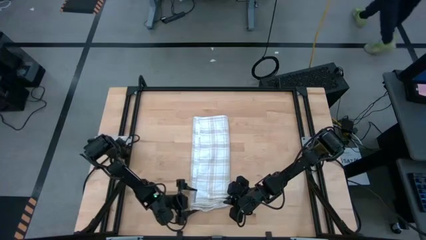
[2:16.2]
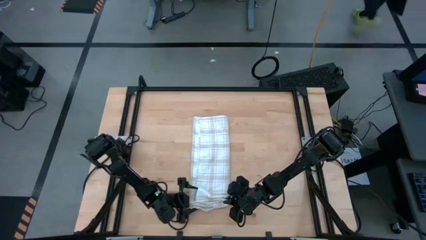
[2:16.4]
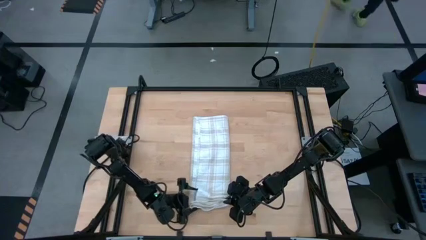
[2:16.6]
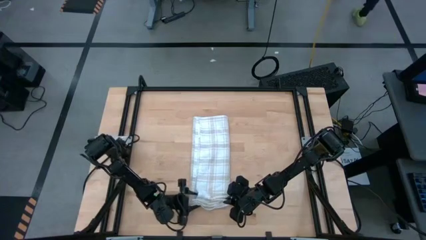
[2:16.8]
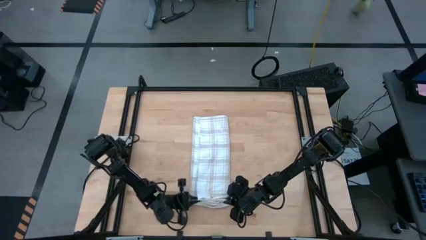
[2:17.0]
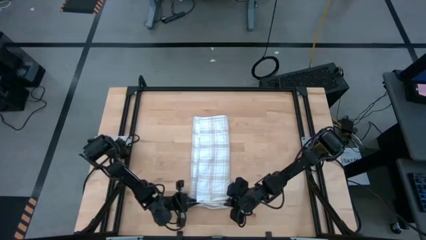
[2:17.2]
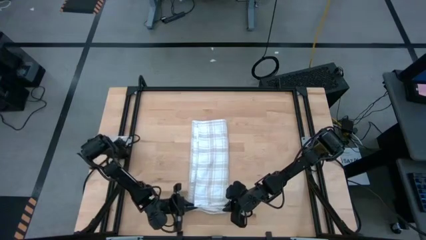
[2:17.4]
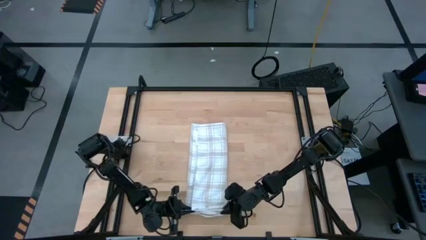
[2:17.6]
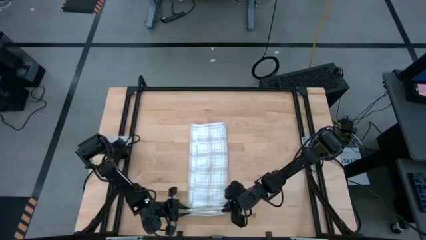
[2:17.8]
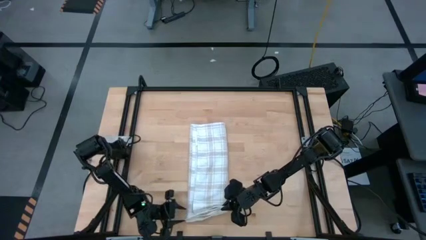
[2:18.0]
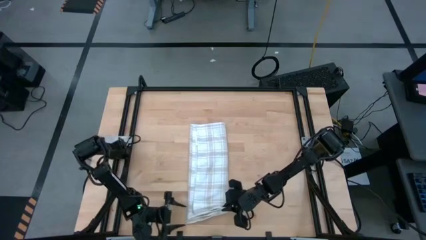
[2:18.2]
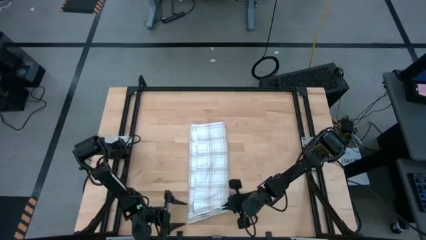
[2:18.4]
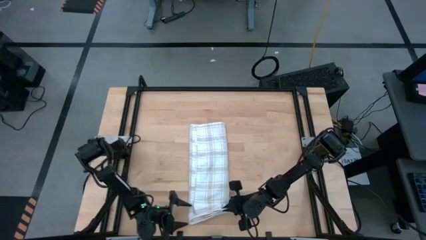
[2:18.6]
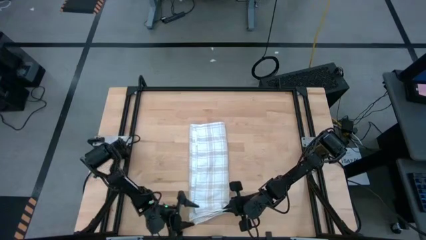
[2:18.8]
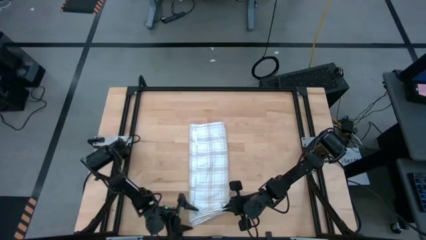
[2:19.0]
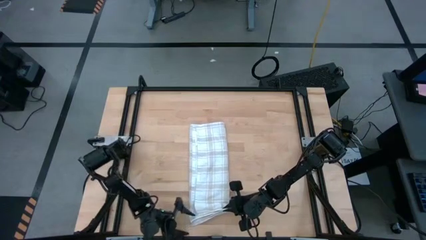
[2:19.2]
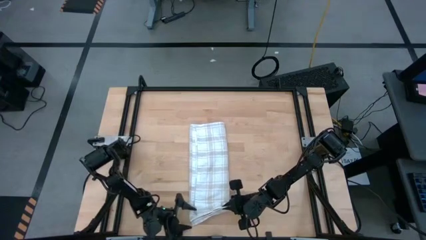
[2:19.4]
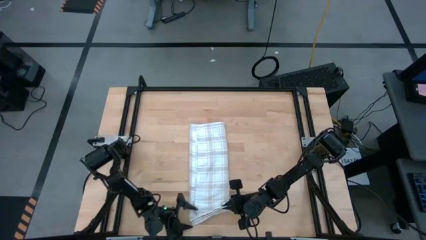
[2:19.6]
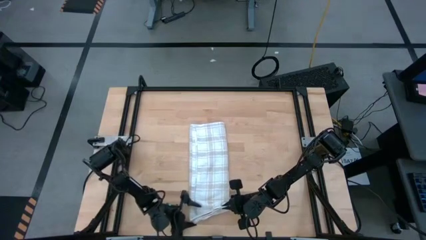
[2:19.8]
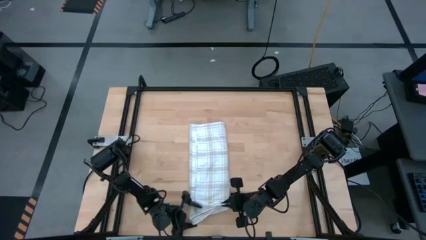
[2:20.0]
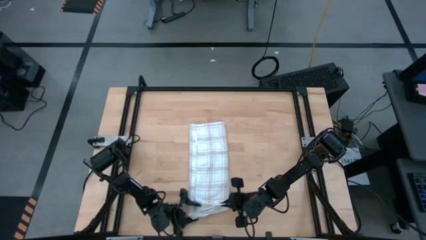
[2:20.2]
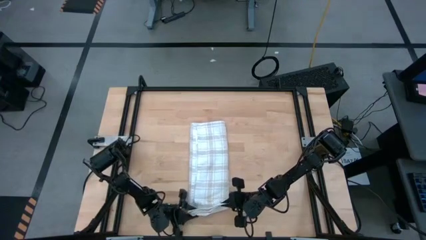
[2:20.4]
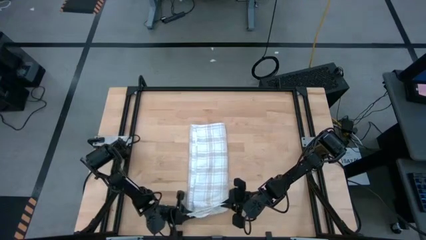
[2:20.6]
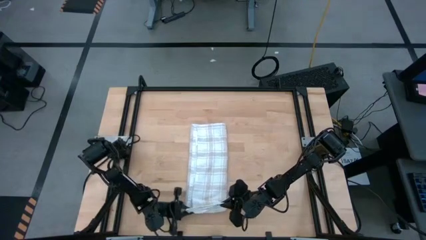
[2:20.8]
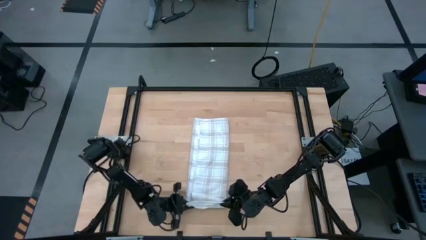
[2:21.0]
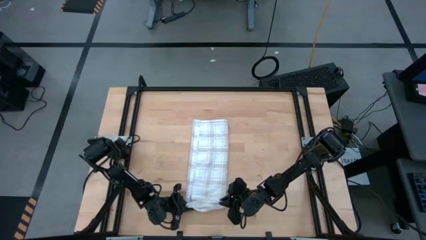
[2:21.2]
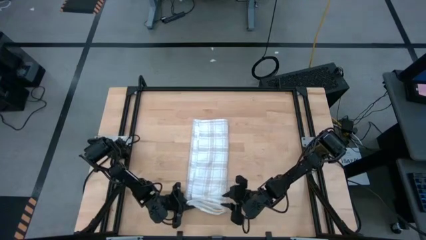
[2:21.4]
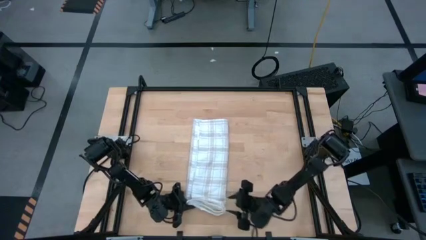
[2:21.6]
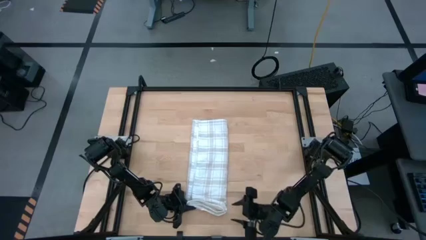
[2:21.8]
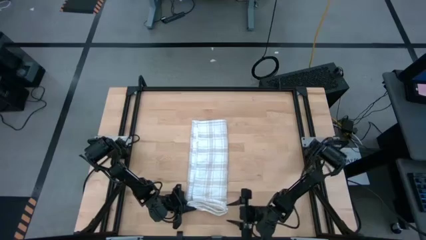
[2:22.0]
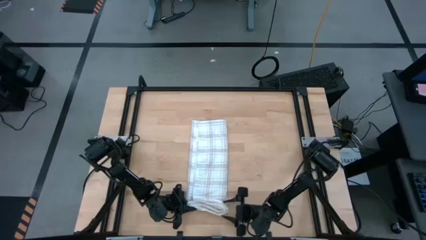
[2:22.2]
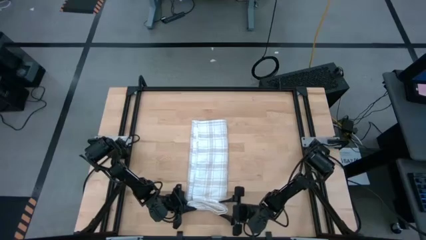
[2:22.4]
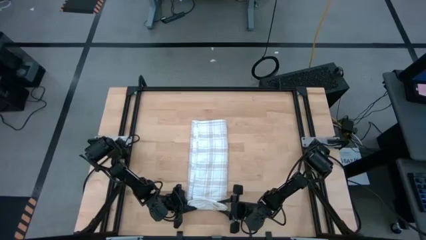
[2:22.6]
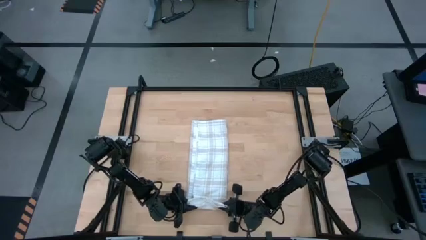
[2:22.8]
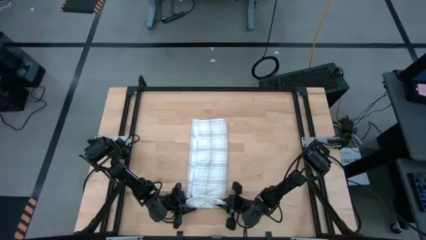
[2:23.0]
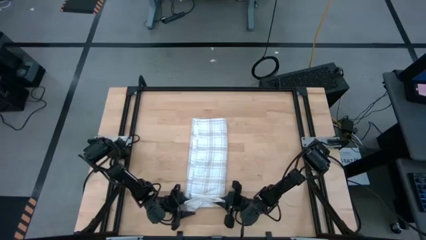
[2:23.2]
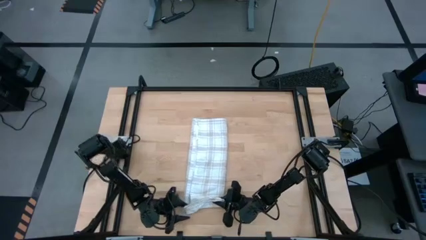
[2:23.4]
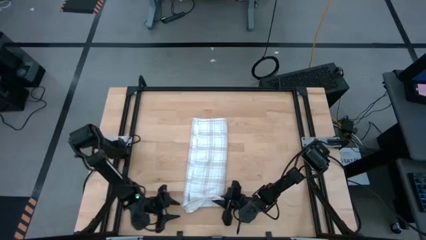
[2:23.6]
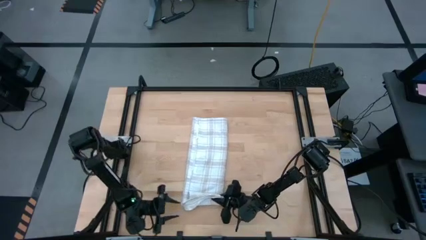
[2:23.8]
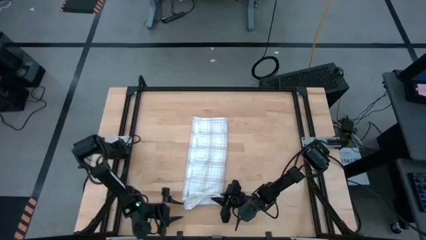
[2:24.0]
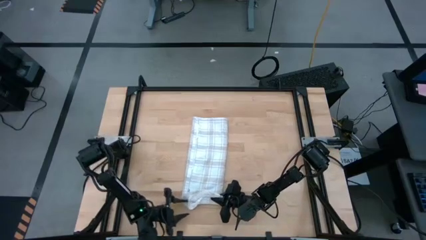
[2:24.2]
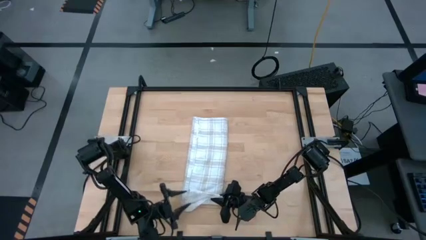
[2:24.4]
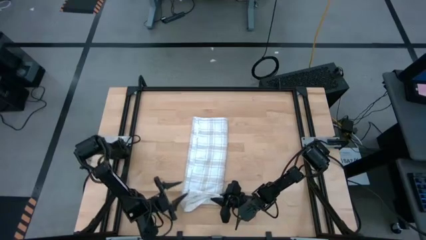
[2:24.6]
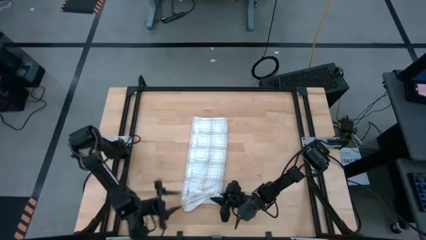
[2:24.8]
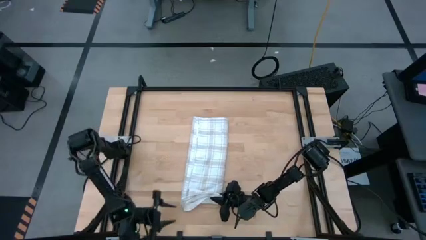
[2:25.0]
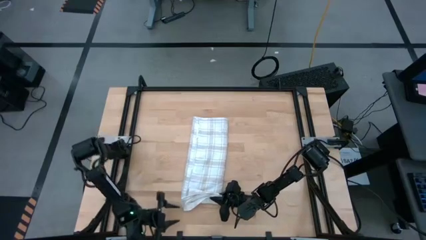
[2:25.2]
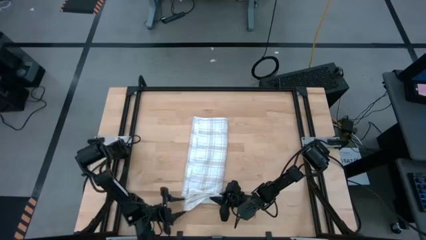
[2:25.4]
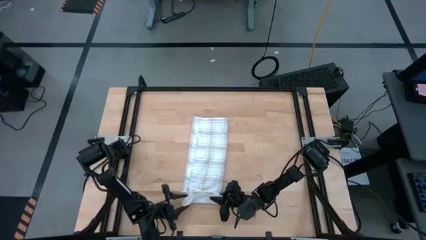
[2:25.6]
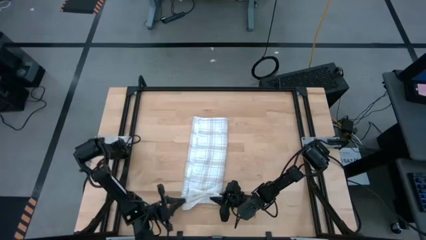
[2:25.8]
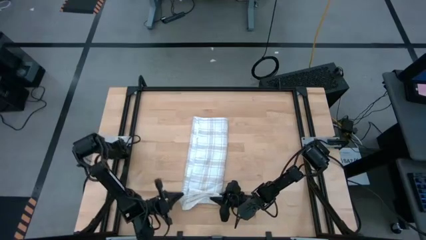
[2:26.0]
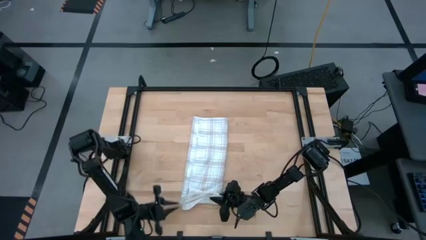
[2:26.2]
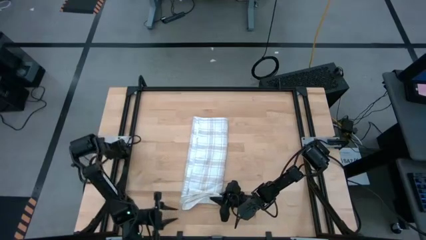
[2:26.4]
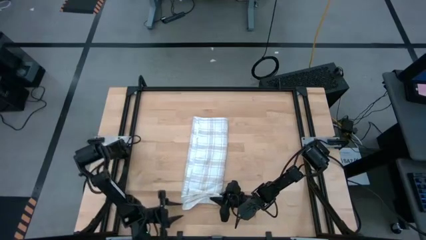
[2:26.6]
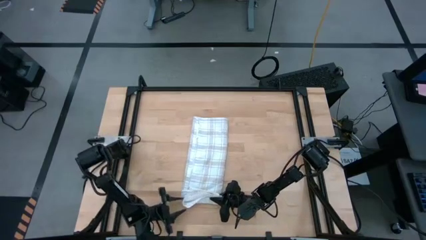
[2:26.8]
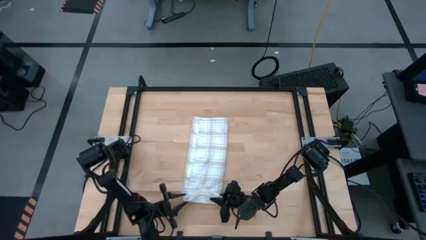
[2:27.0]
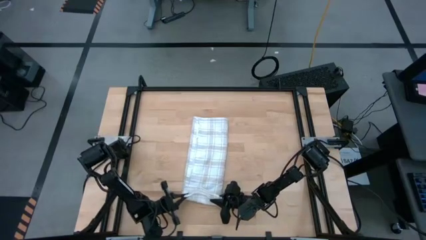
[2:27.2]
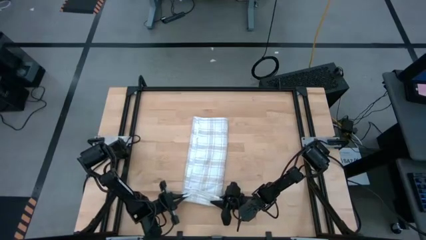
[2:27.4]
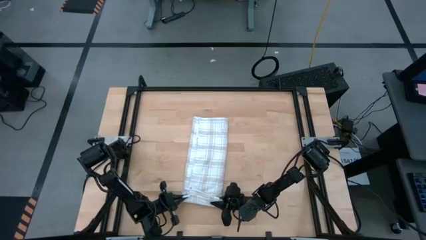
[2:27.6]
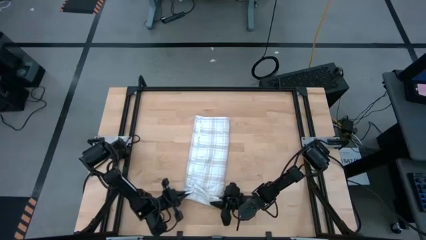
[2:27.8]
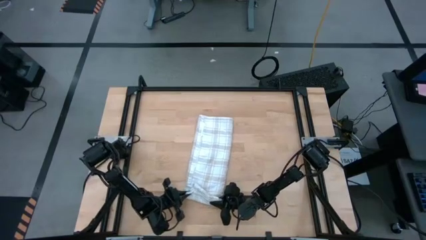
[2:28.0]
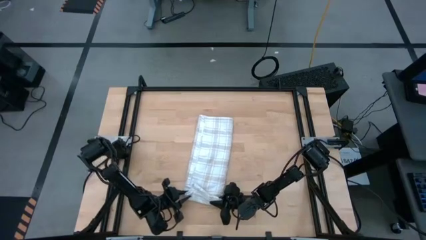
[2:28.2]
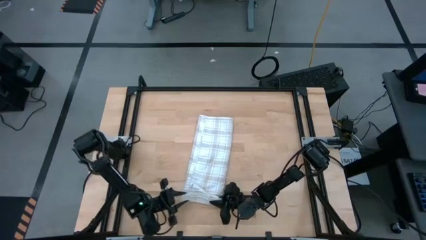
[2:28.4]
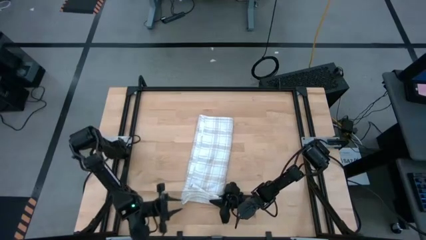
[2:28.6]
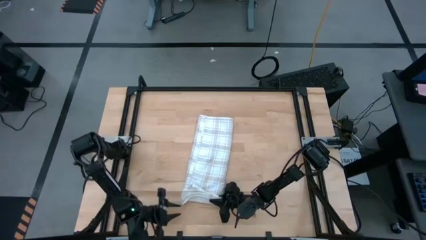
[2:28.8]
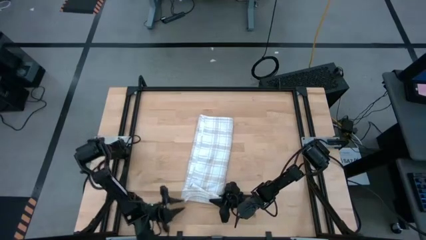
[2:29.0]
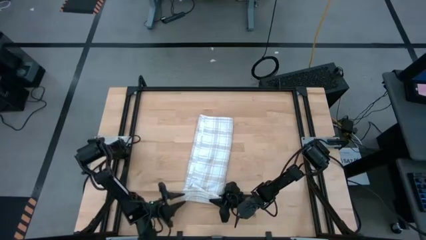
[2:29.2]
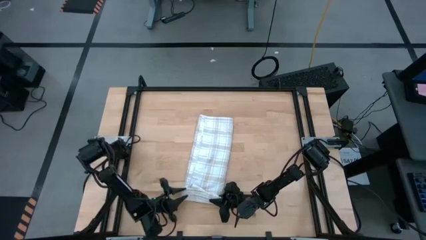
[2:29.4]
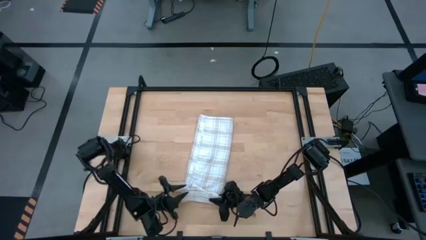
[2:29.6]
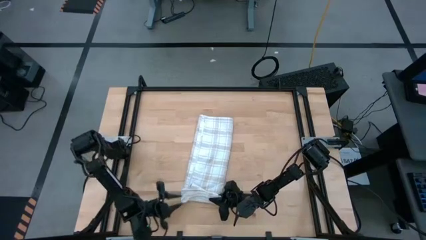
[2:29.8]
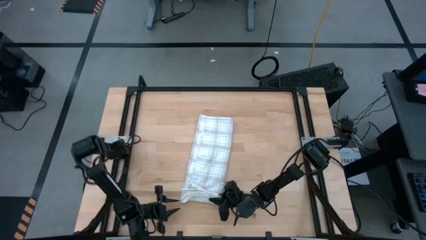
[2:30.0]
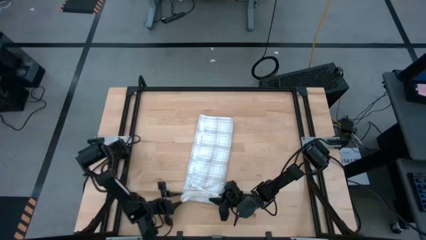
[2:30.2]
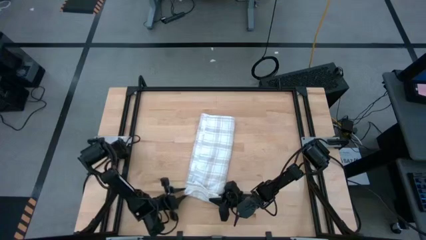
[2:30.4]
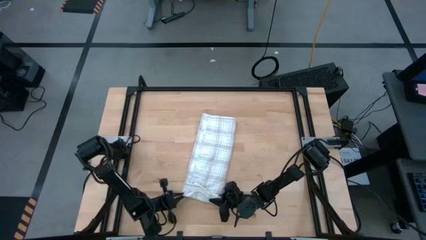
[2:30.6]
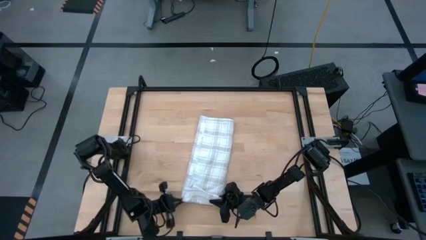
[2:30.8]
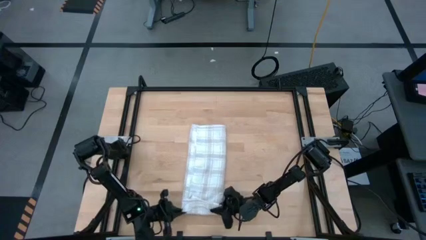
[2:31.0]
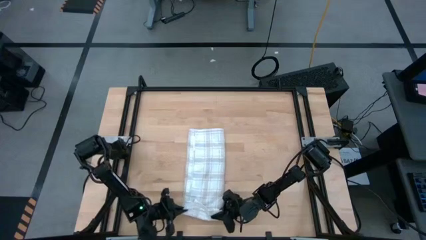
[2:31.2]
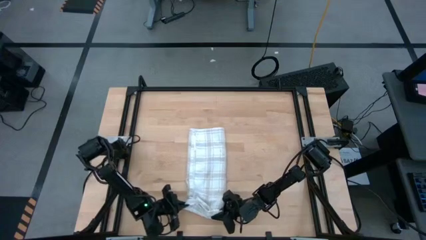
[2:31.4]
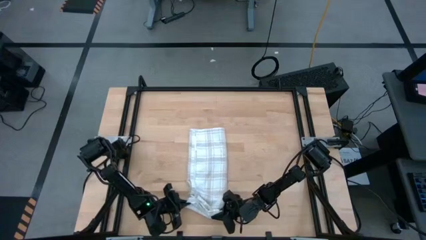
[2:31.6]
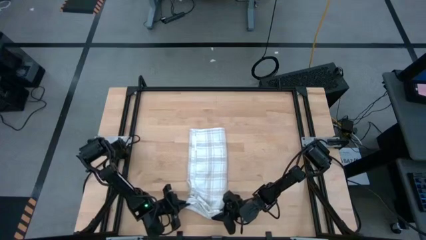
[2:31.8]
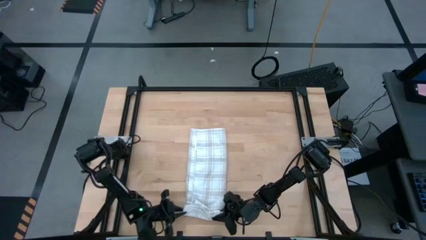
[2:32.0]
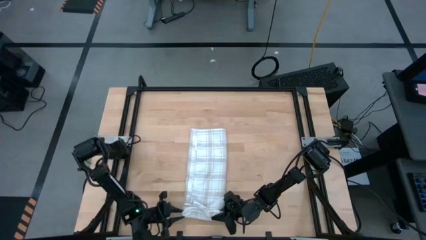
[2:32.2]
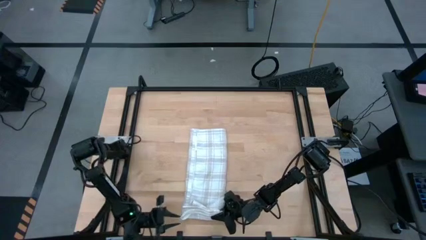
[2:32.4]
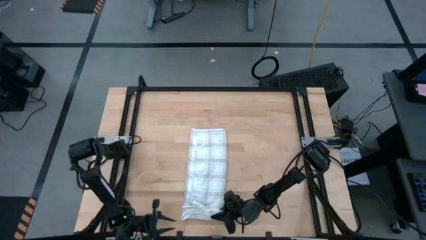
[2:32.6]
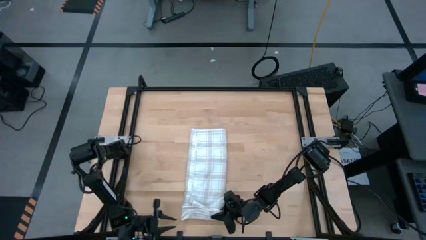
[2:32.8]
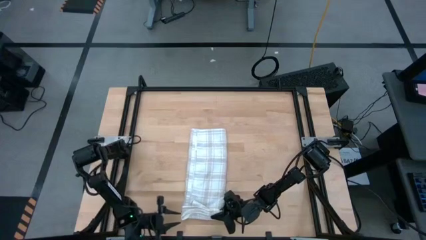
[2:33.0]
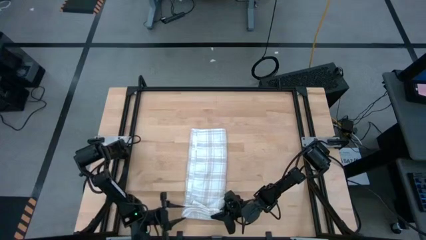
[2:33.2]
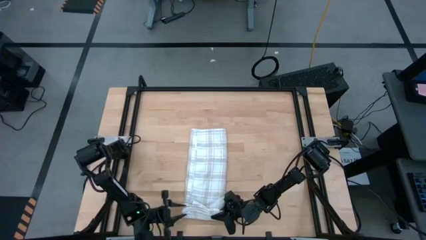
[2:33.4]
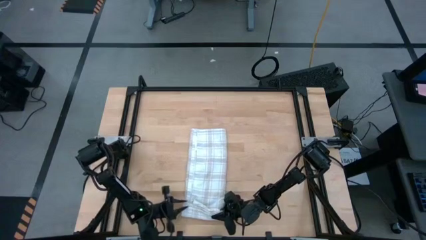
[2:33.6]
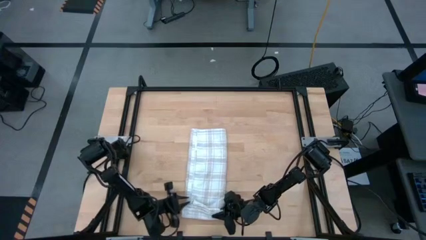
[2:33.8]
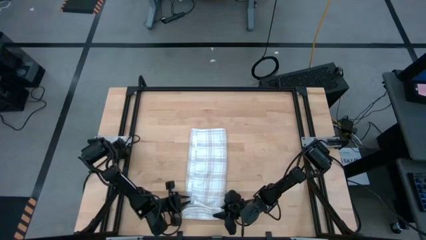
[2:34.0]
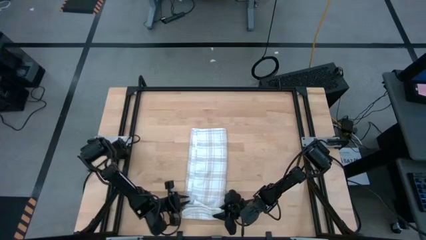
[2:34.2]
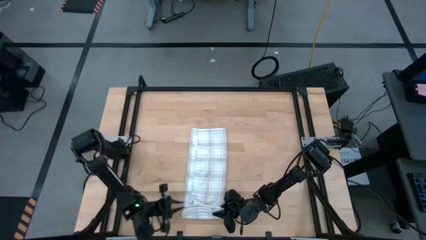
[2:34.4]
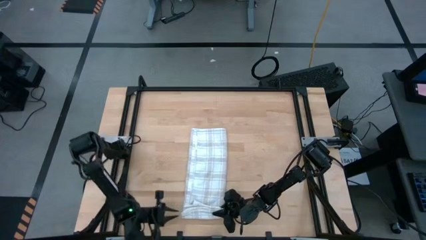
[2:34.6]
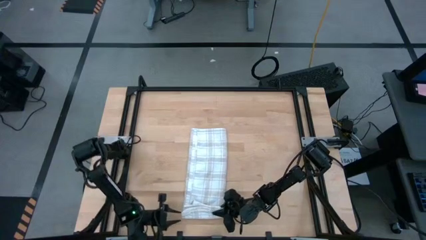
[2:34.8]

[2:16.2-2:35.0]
Task: Roll towel
Roll the white kitchen towel
